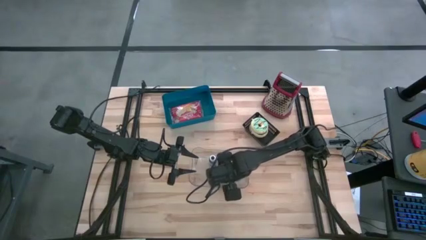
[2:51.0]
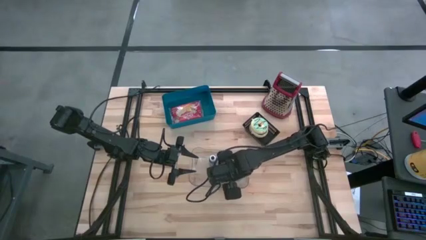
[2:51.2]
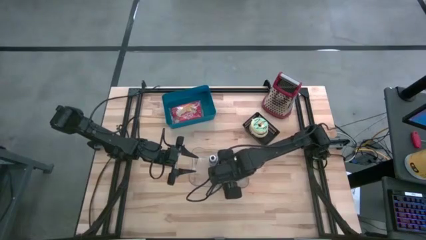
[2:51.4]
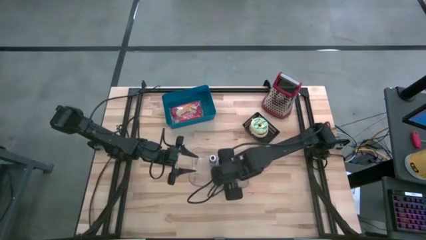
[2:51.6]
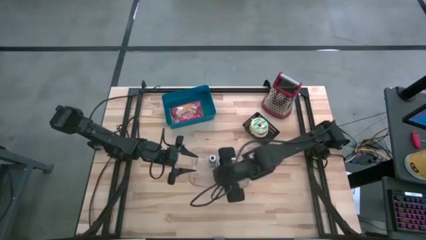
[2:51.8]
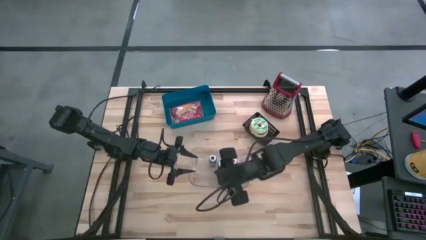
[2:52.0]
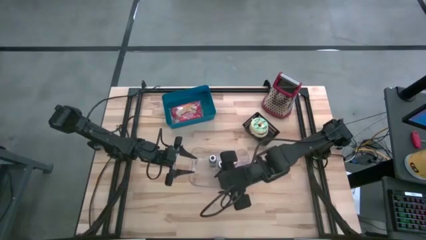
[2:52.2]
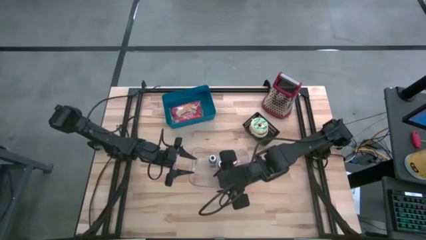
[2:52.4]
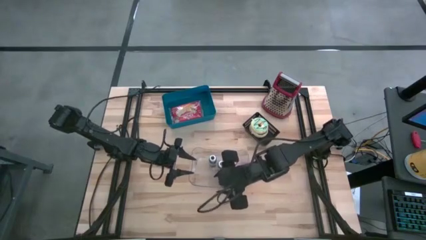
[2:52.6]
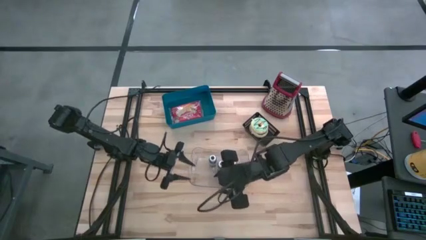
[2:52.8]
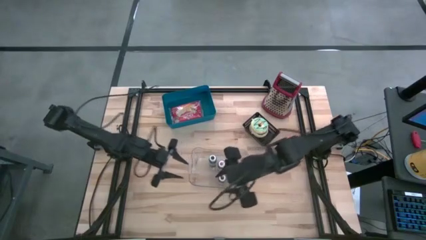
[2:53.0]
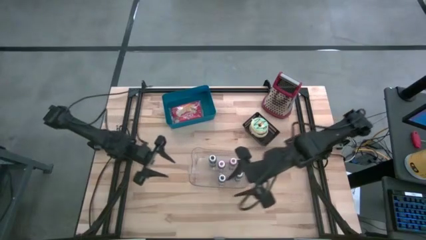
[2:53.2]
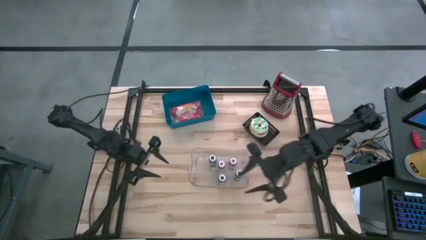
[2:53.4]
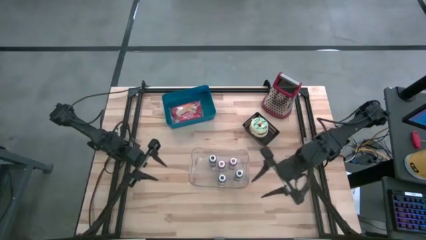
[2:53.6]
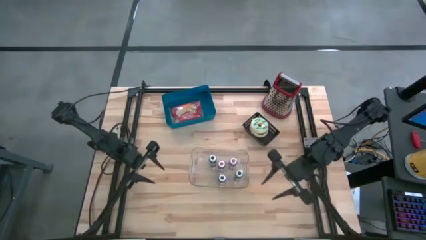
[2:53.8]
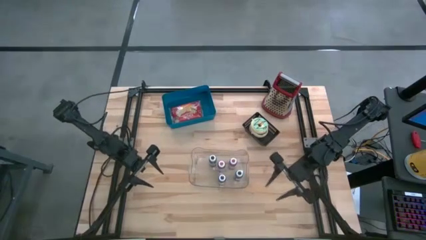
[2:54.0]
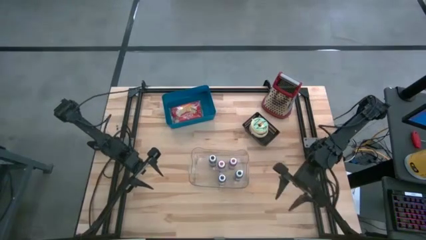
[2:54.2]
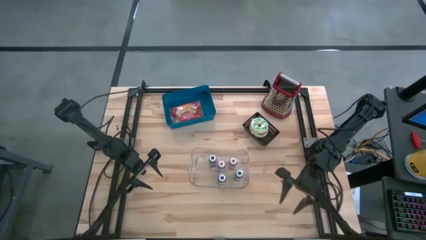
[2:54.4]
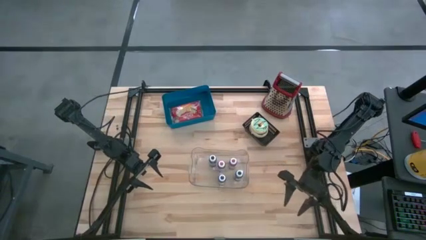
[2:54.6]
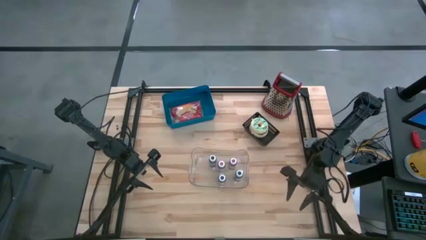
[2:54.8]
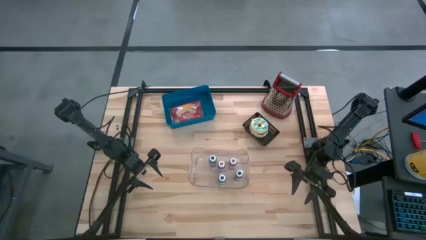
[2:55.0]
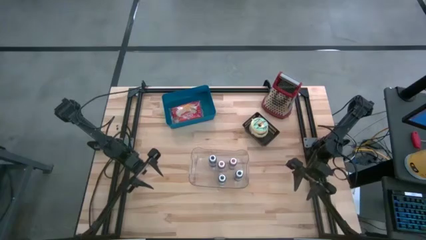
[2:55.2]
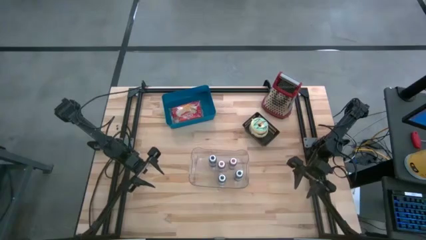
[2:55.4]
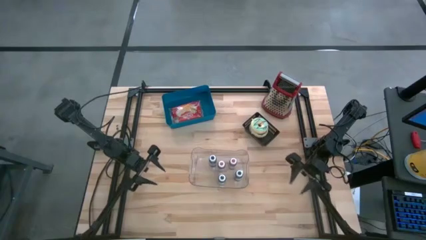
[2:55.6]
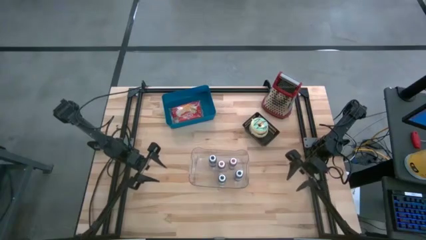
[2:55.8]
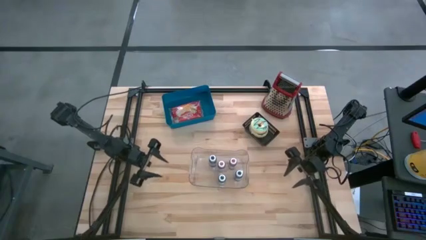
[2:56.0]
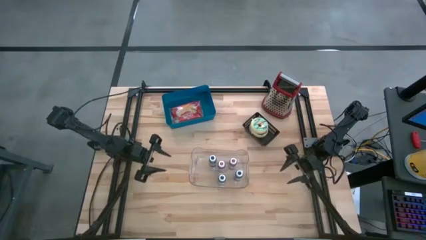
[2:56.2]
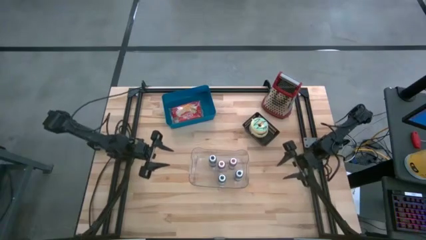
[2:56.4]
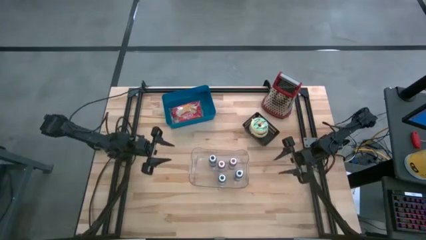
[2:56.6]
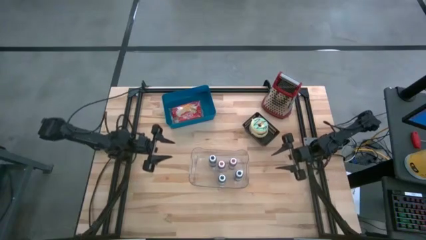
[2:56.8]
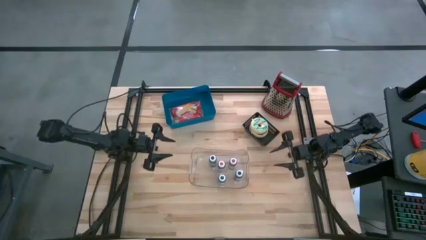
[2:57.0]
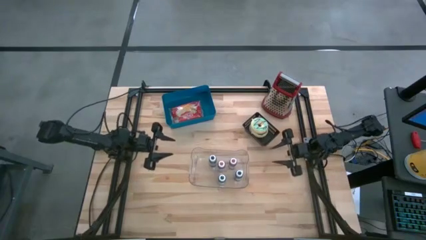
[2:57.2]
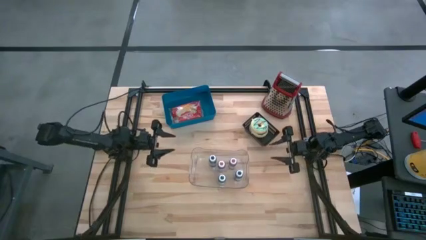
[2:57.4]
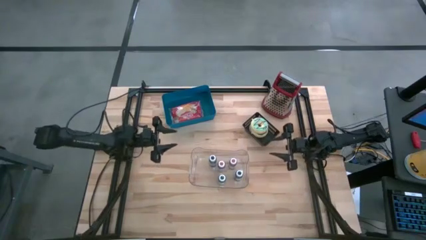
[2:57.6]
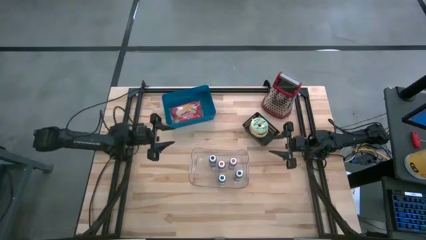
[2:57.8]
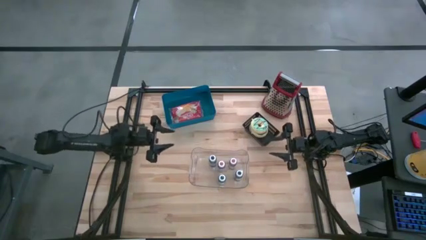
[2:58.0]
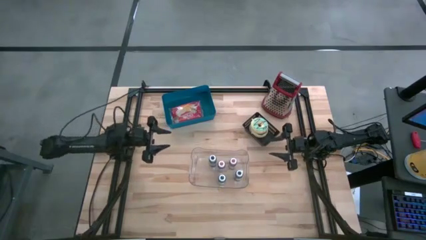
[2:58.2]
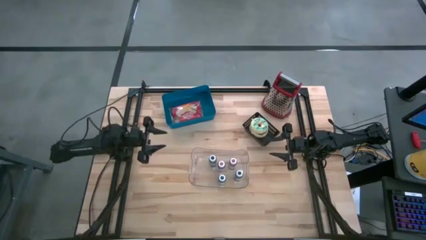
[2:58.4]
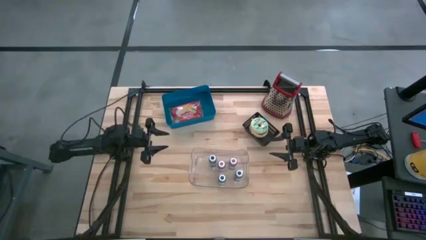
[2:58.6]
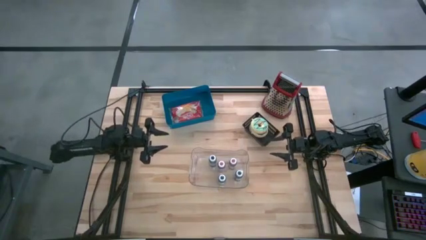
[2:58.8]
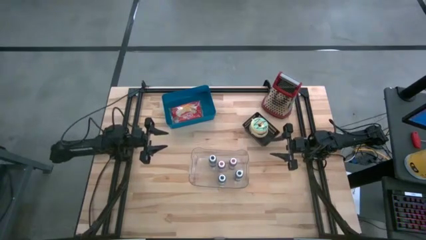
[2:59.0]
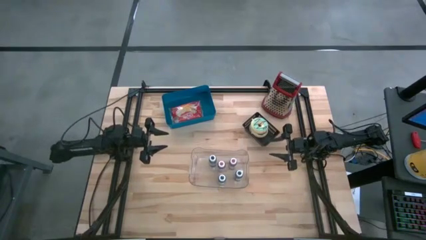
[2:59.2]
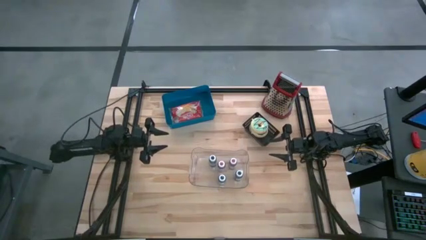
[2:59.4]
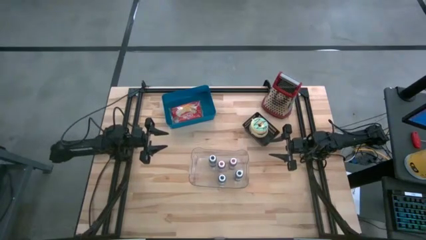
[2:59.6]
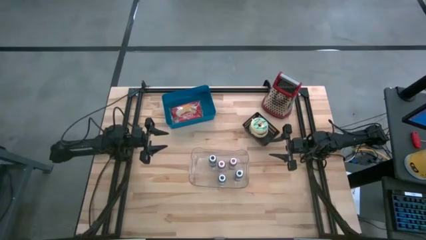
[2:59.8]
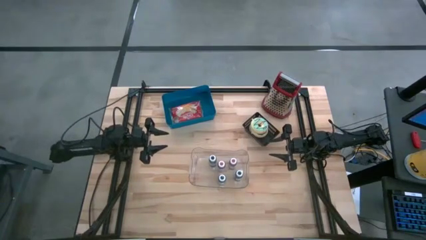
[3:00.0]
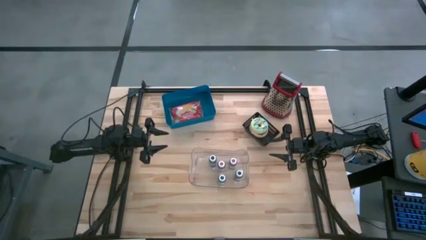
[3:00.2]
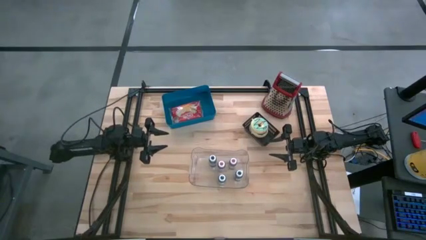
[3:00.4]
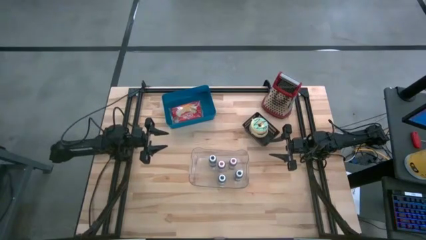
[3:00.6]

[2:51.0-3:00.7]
Return to Home Position
